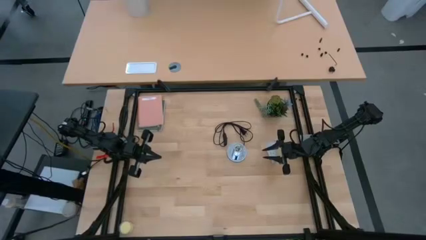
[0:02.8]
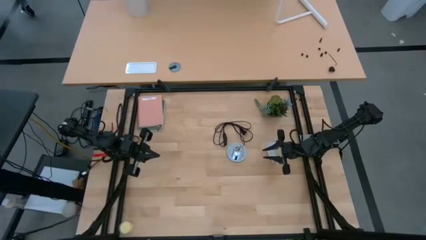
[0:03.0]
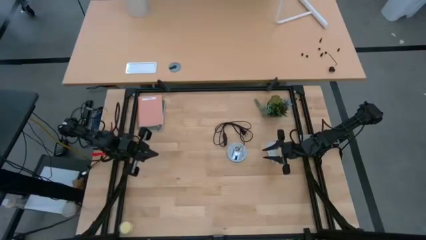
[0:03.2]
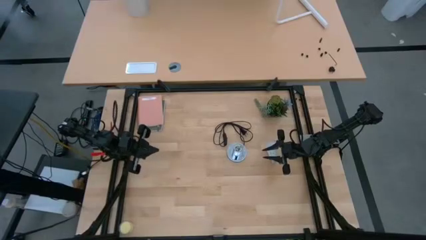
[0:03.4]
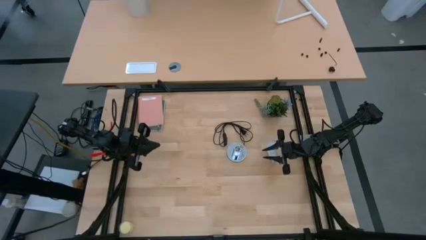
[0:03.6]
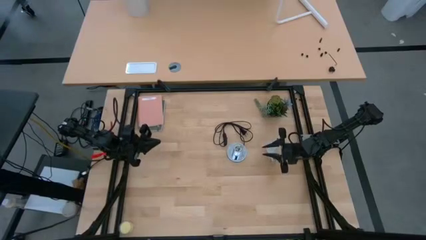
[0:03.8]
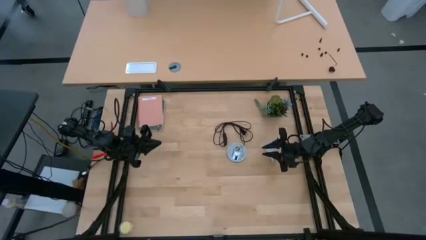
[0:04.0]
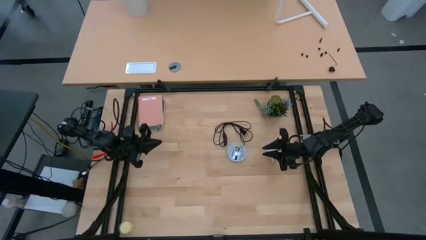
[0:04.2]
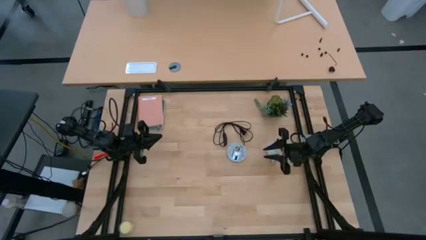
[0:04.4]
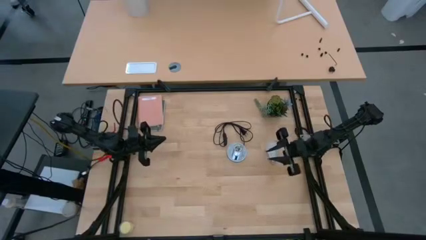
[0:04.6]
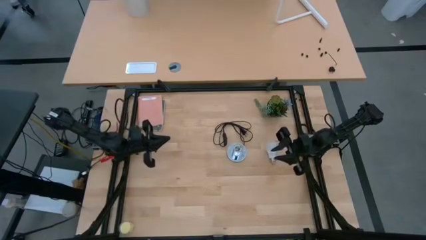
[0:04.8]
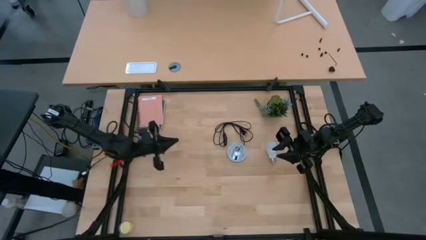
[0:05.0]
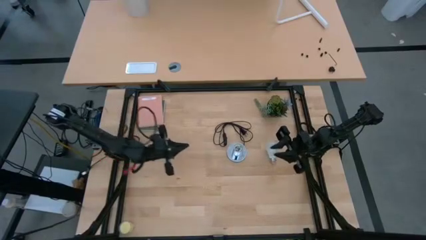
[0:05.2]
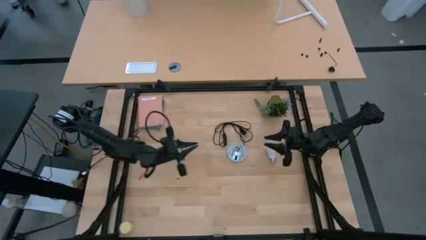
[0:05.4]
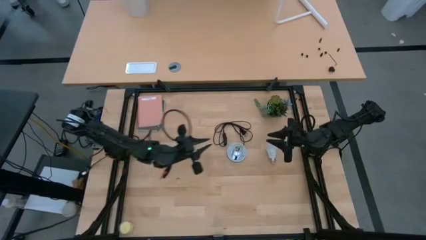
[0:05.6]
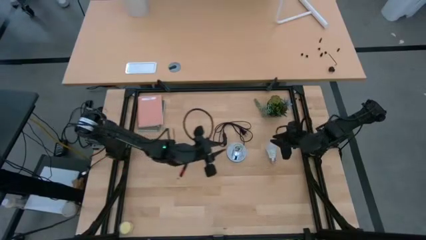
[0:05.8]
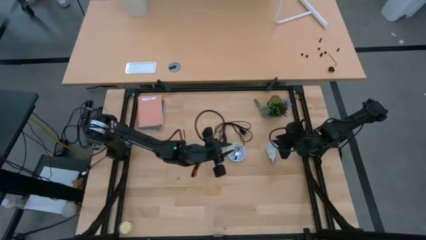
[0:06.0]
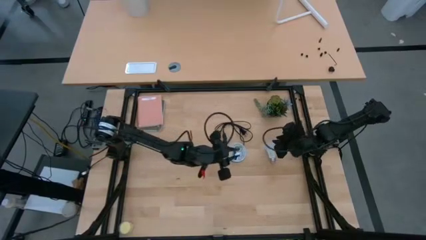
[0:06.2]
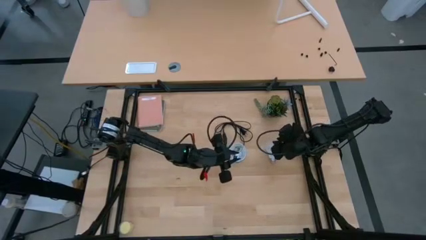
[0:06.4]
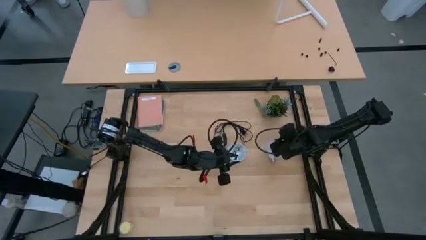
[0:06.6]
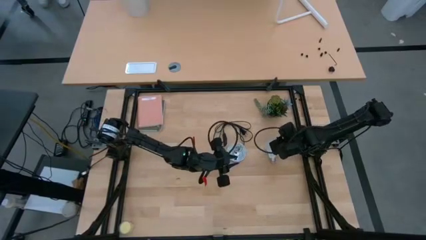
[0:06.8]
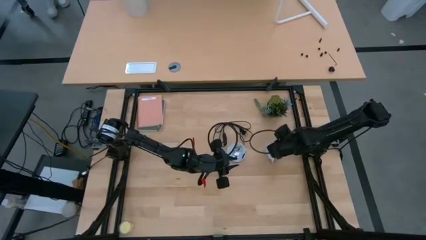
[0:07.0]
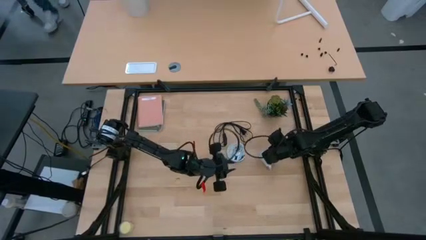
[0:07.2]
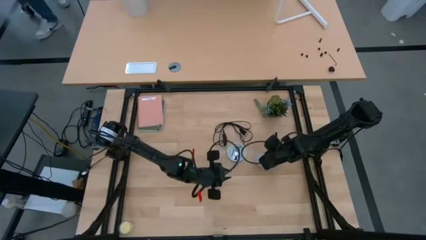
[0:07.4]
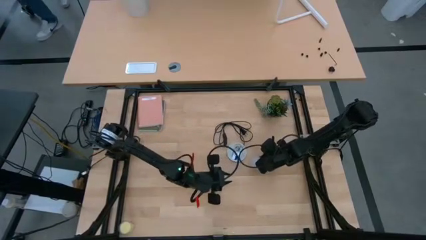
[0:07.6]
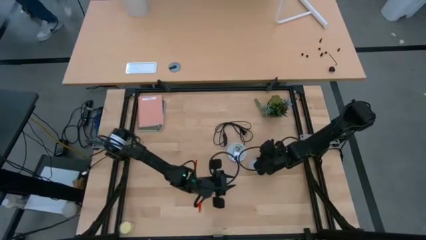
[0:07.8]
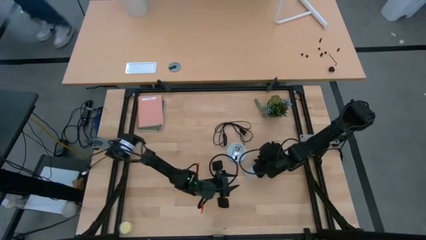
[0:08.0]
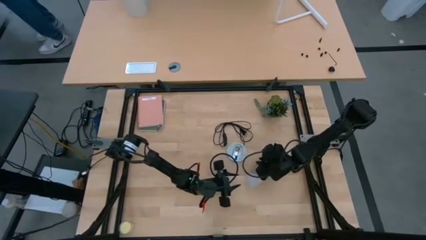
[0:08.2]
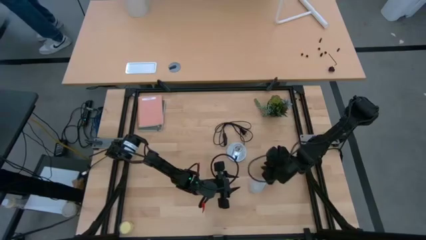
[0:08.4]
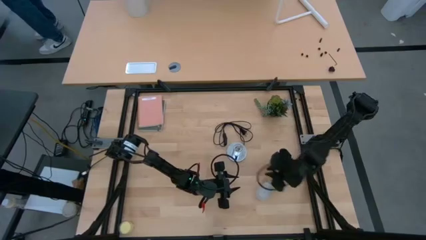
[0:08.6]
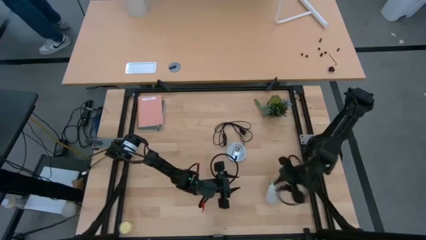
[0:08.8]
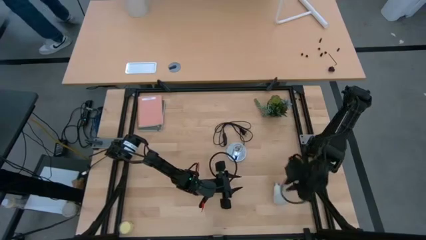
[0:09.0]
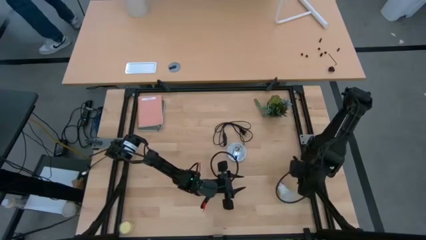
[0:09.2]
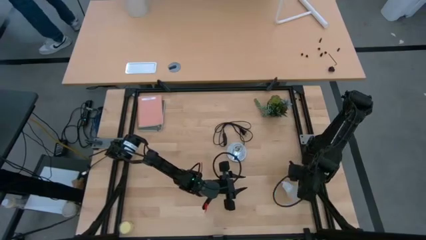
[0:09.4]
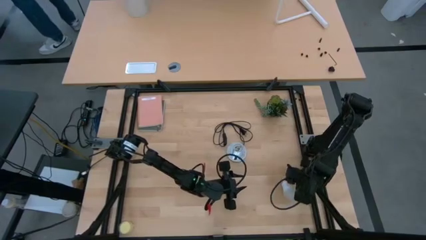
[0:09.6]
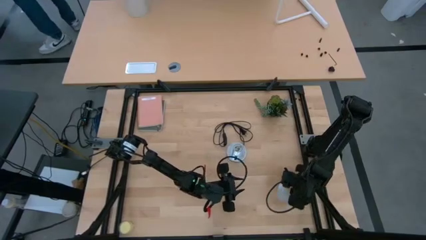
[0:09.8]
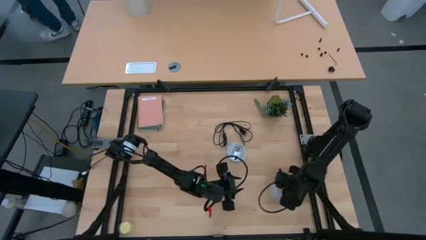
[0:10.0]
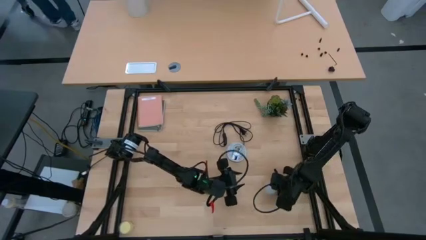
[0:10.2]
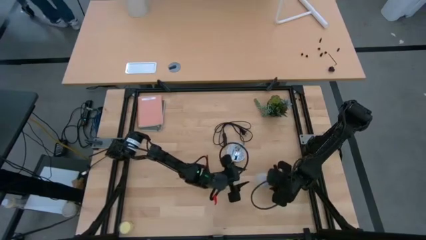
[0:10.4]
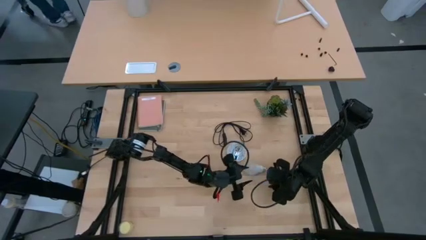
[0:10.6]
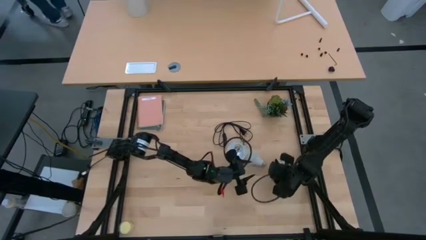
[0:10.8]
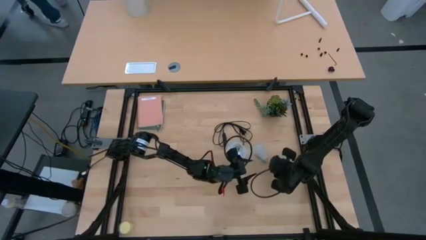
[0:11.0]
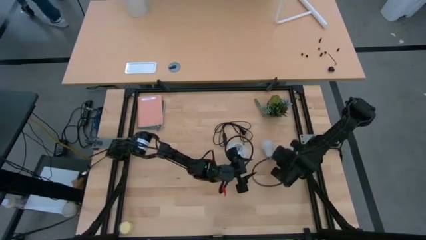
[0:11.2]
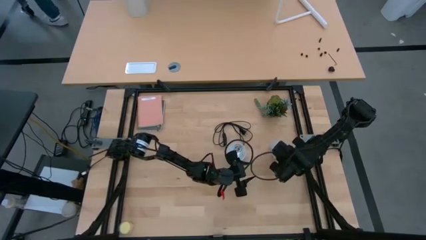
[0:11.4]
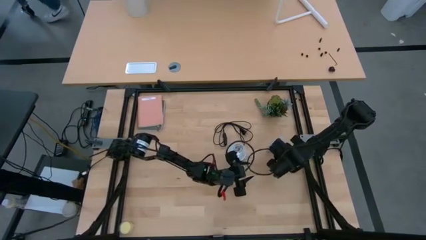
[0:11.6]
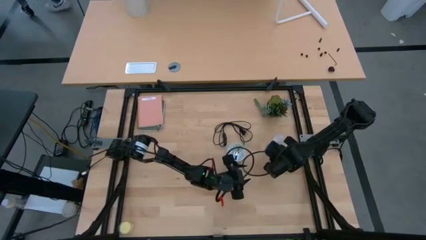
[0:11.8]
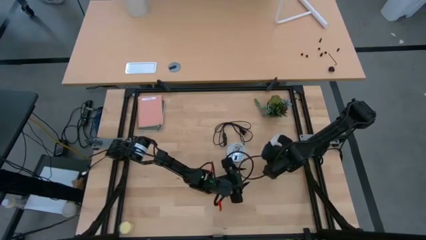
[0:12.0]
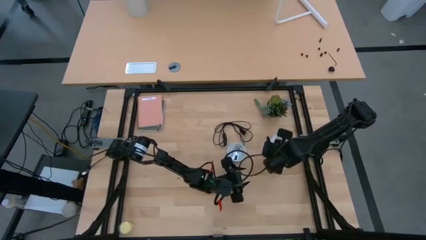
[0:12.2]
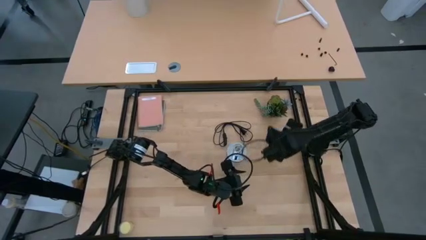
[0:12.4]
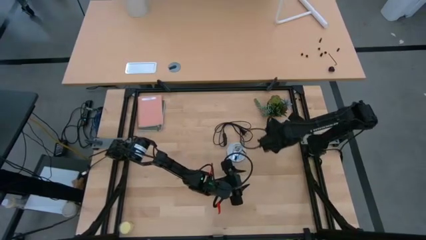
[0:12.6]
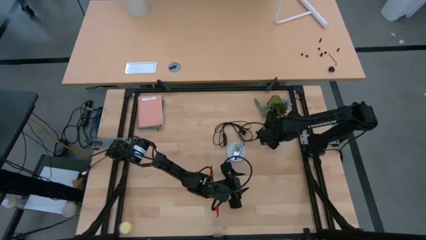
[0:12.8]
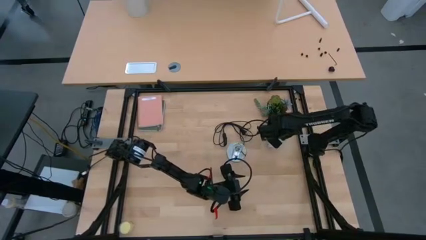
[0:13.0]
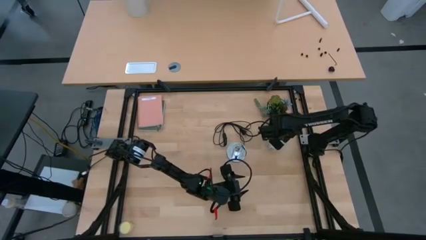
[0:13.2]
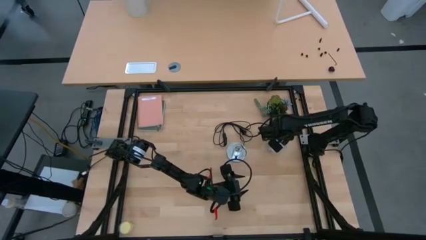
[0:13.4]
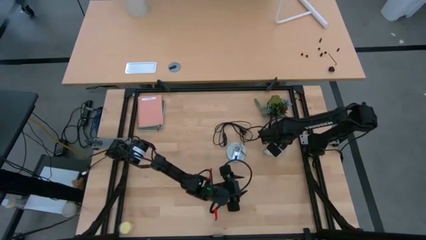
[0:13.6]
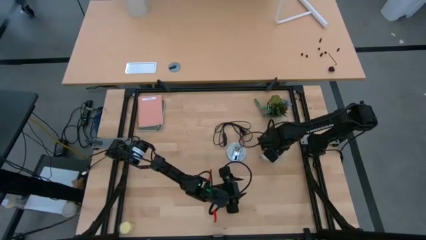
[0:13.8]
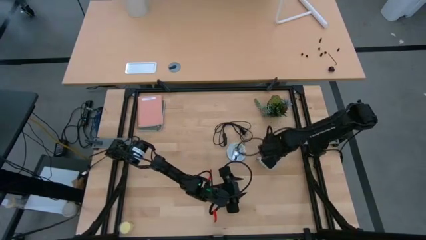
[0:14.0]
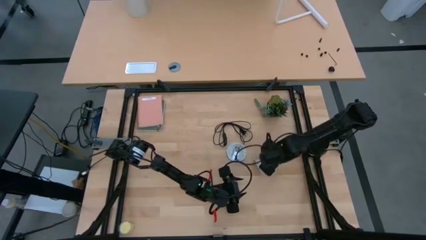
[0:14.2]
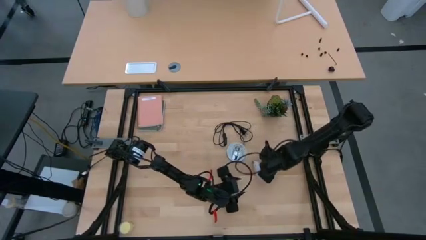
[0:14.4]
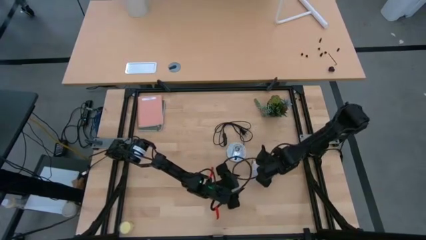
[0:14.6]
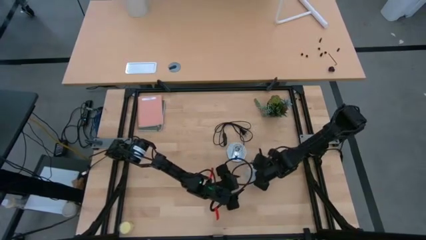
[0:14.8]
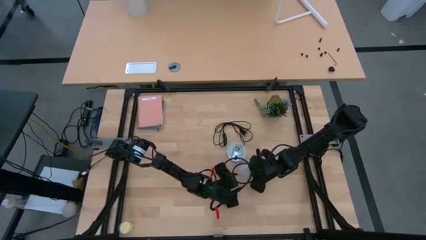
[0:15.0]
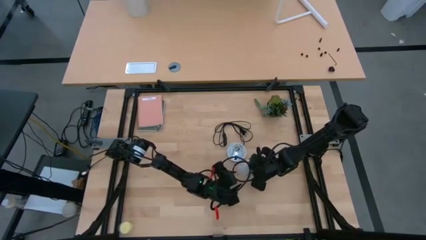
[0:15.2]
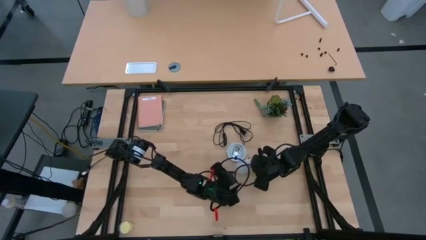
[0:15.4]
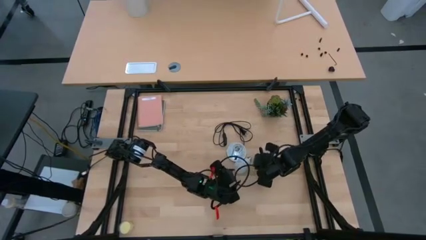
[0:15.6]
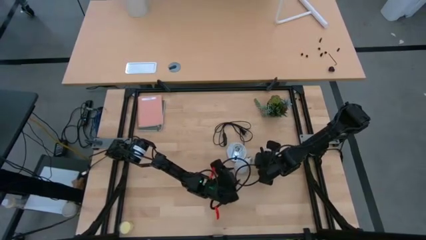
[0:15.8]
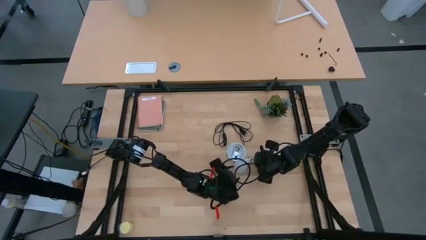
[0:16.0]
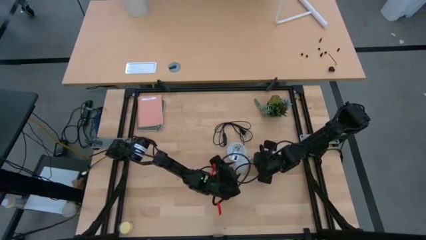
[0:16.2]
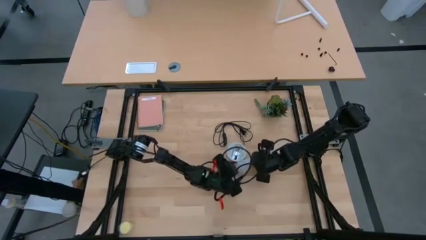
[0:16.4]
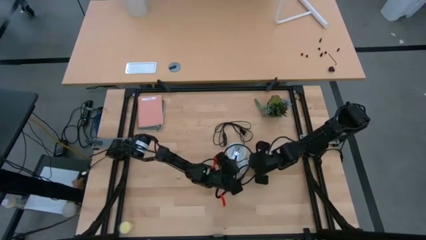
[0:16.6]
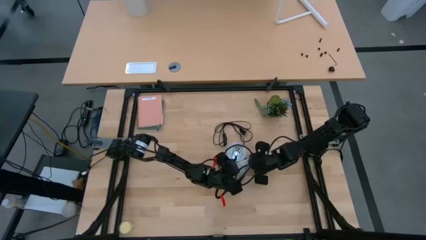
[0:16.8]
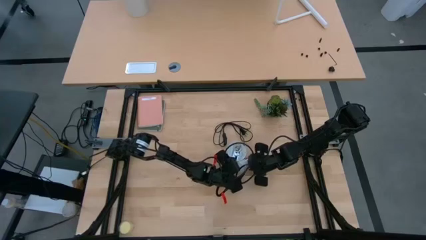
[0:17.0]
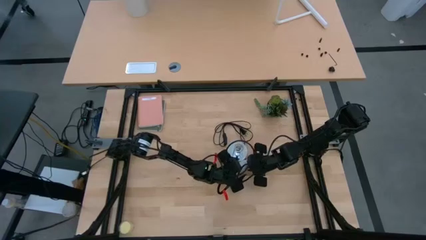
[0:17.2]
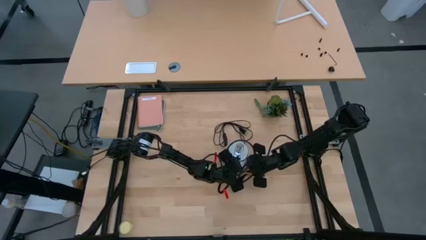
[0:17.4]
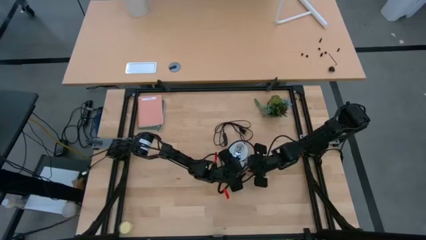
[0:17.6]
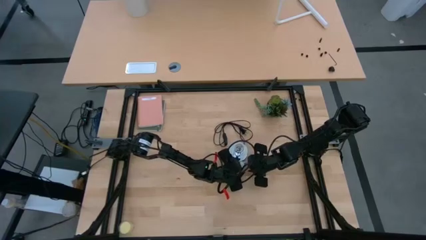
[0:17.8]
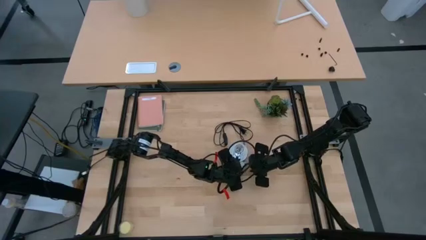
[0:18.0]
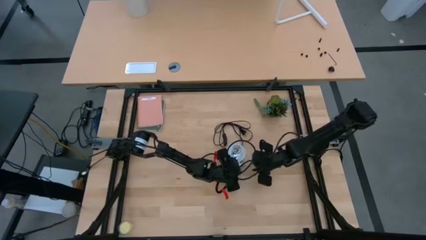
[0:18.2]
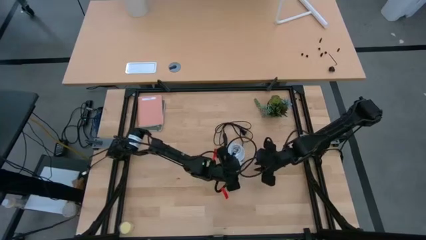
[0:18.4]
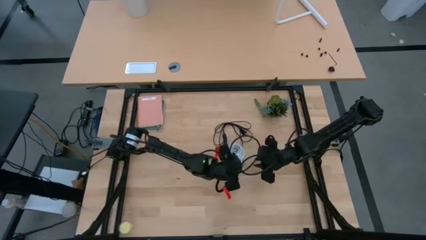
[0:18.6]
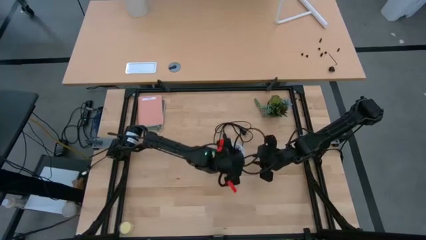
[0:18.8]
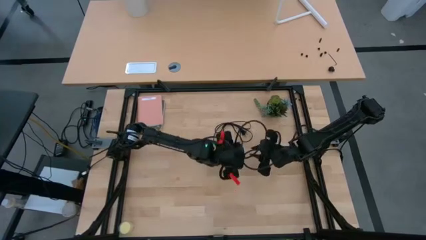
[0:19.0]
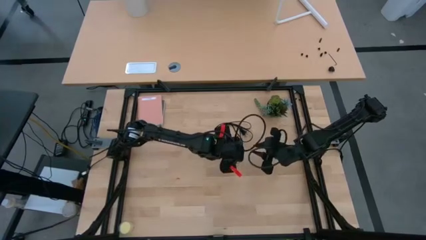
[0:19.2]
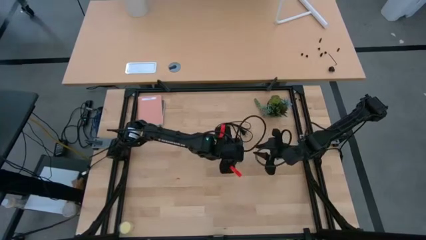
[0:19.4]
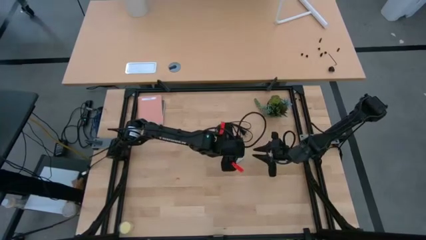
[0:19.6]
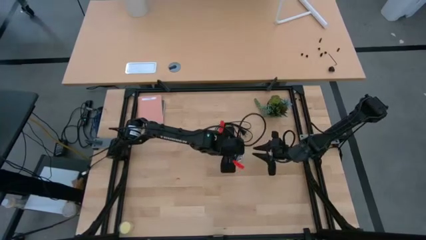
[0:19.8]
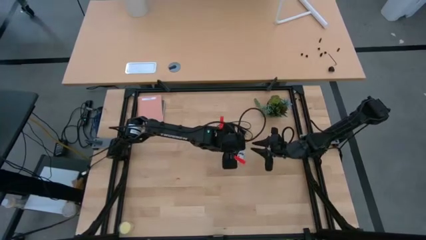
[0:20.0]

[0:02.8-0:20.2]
Task: Screw lightbulb
Insert the white lightbulb into the silver lamp
